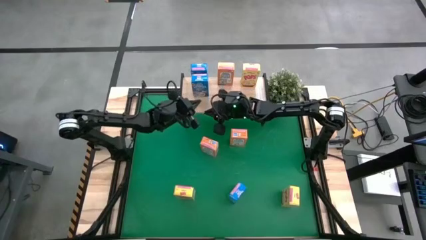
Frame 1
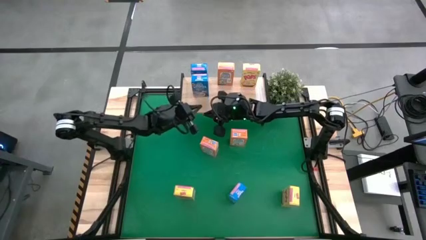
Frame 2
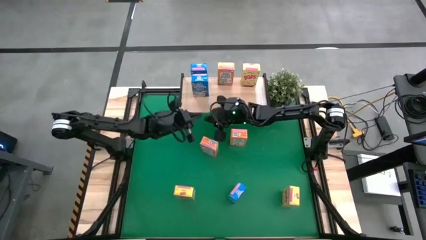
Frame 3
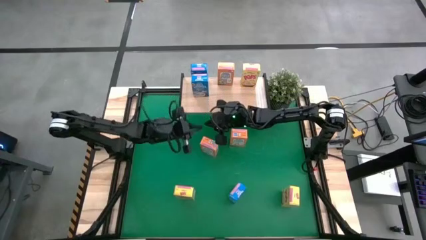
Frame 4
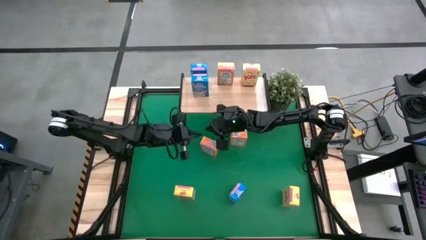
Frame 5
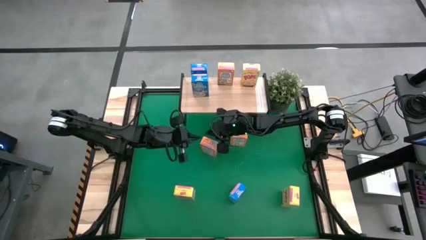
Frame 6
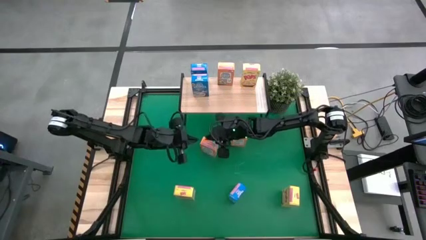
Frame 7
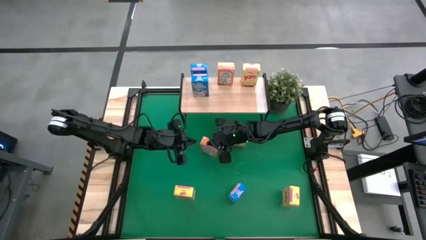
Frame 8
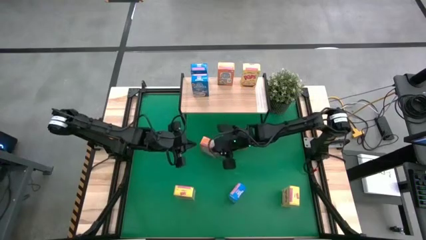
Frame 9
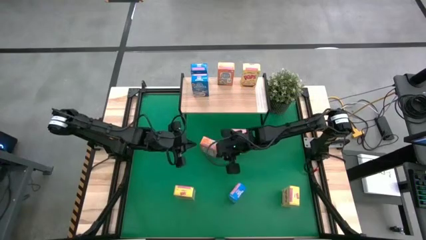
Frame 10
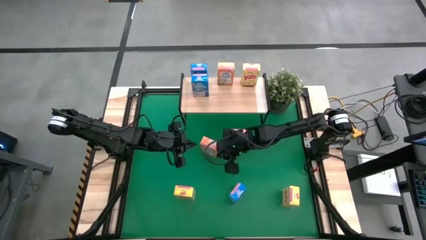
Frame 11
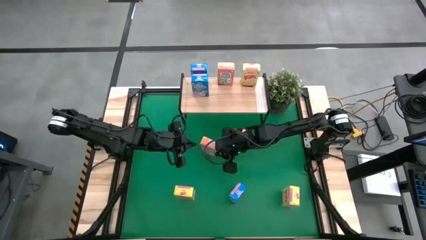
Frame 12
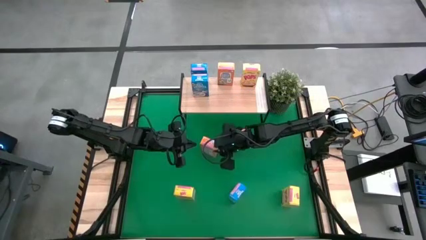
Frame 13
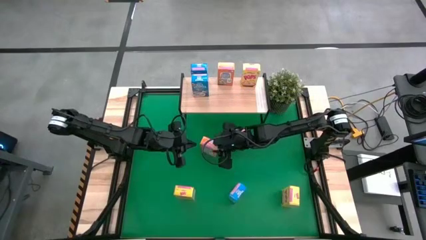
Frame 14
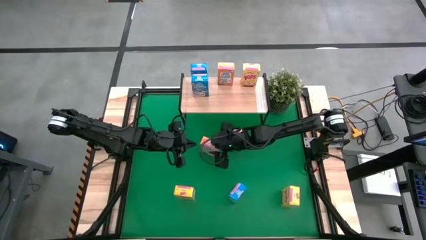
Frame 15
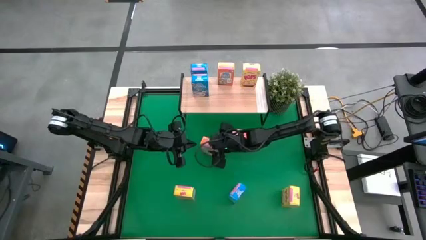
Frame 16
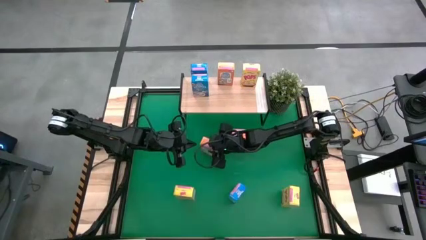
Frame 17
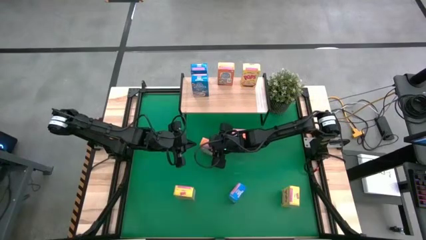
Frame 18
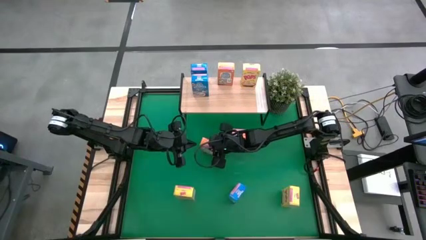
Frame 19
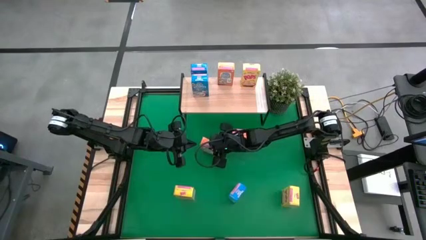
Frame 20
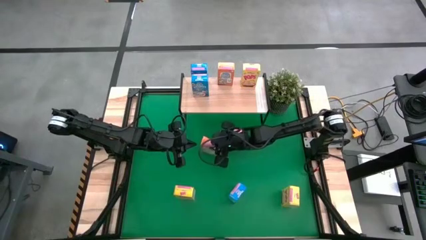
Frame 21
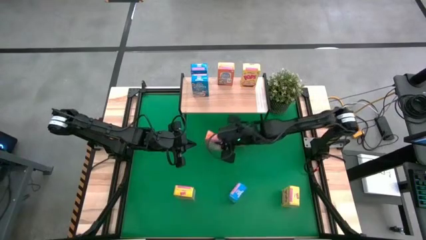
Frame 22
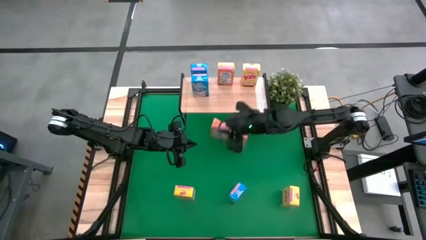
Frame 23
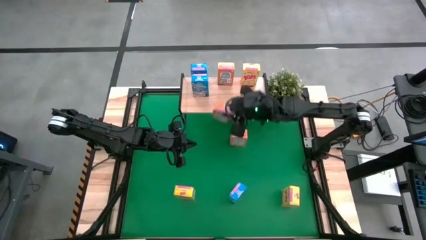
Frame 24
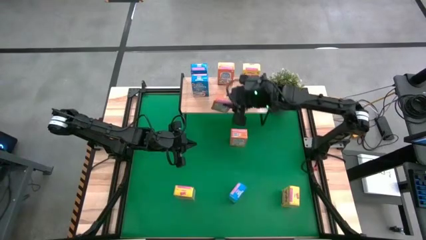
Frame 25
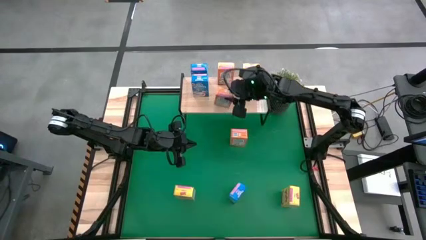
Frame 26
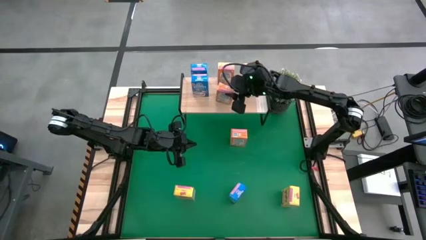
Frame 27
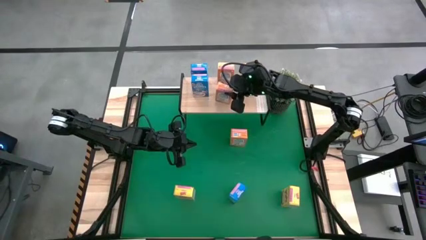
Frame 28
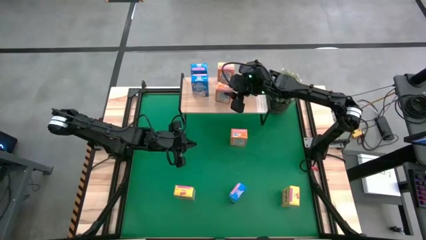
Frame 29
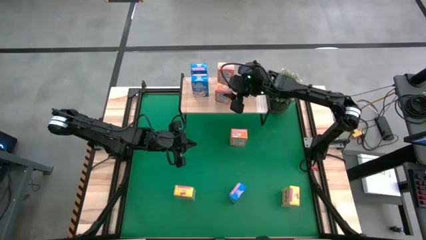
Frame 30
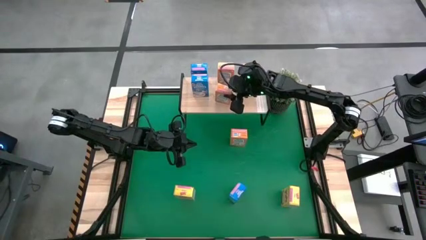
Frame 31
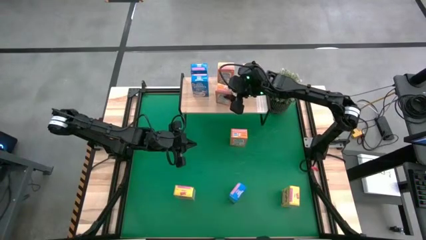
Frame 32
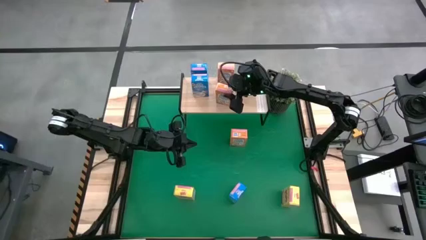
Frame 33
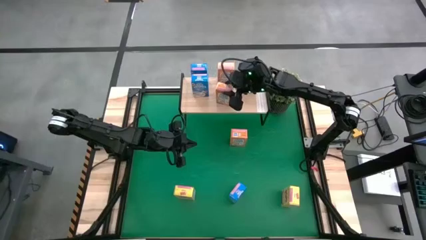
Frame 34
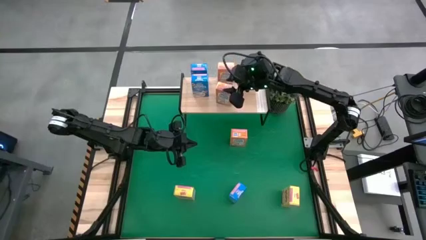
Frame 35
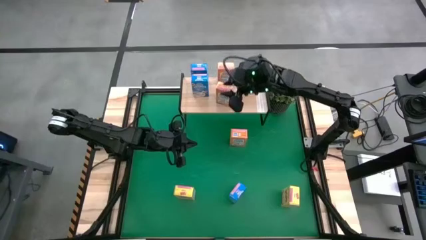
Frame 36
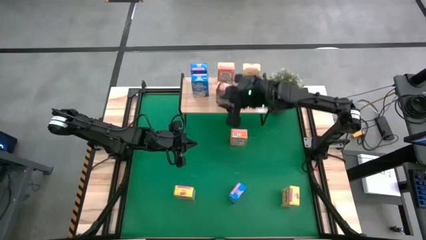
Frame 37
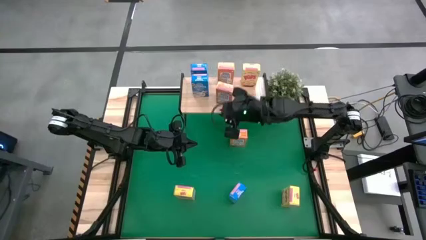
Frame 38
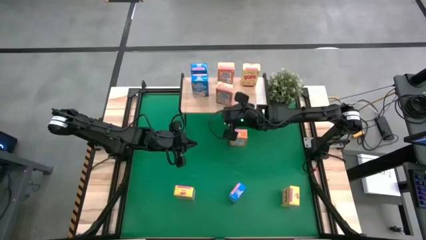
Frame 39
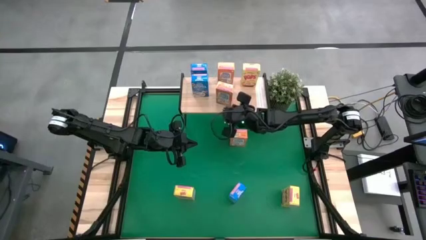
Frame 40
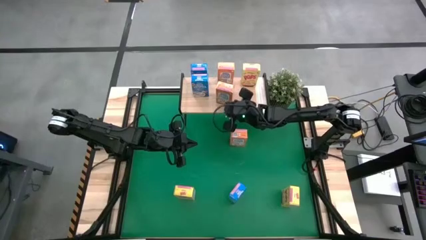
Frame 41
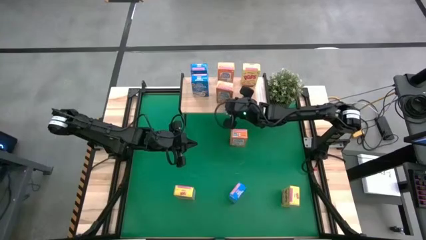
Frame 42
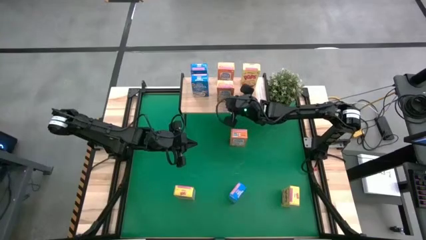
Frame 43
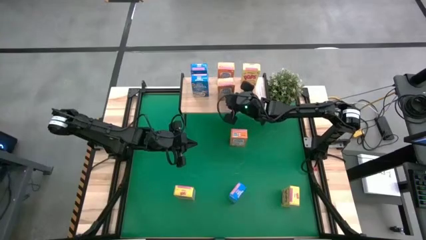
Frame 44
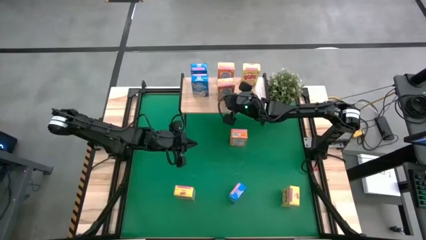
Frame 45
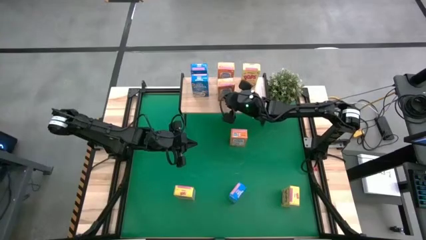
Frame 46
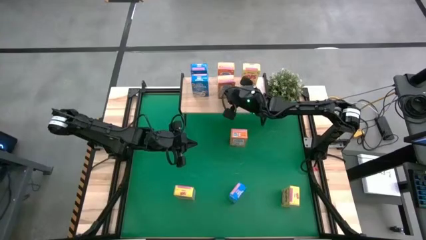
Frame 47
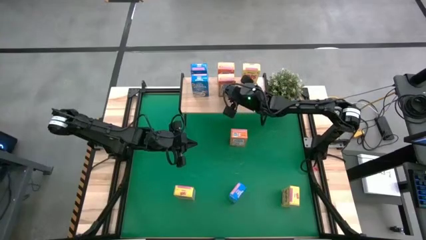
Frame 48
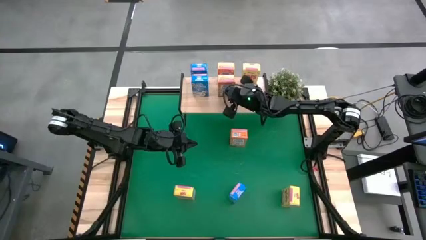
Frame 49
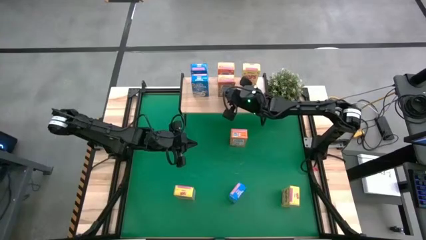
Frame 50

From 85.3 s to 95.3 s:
Task: Stack cereal on shelf
Put the left orange cereal box on the shelf

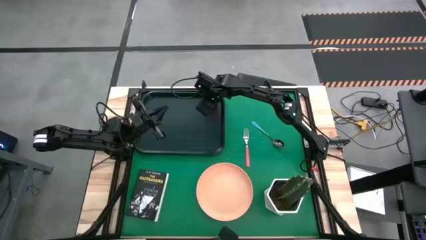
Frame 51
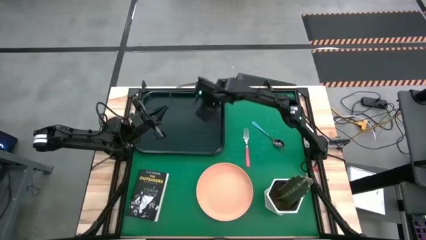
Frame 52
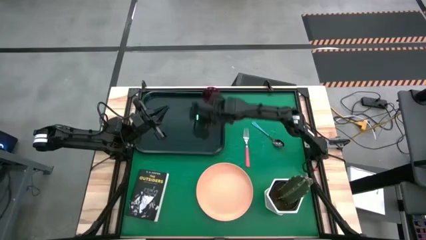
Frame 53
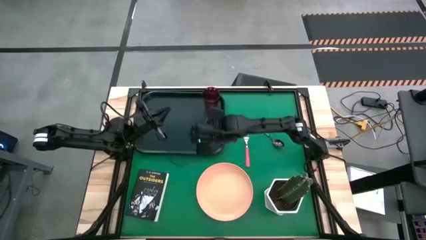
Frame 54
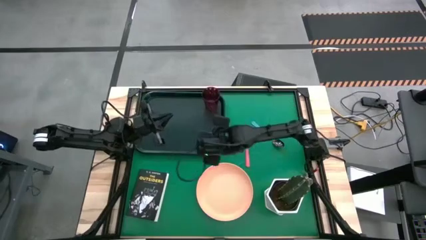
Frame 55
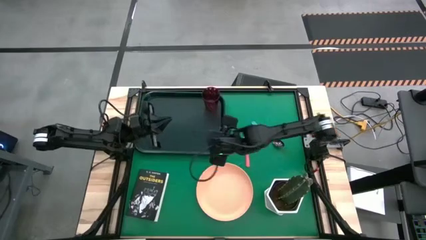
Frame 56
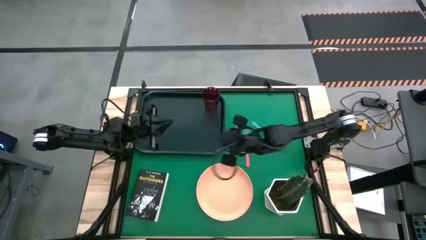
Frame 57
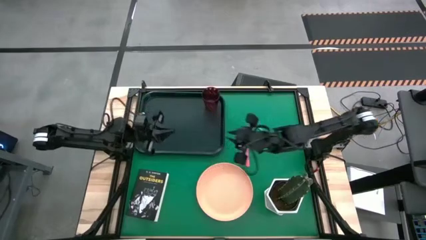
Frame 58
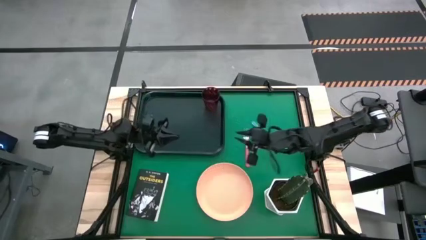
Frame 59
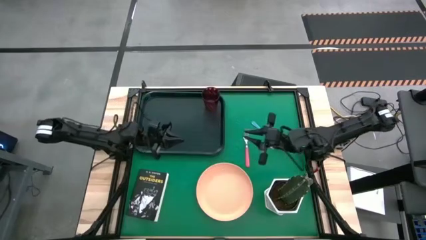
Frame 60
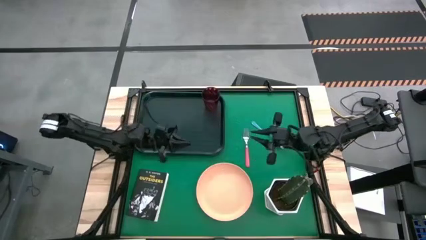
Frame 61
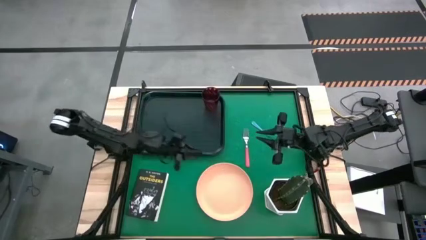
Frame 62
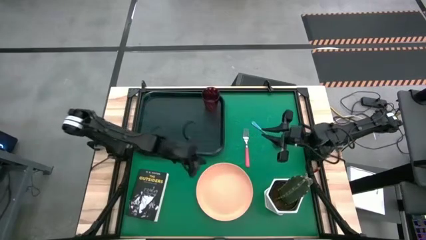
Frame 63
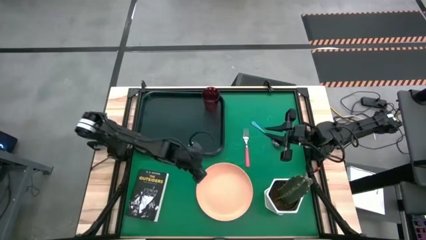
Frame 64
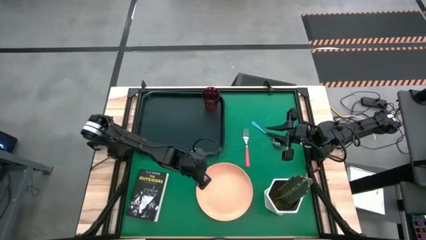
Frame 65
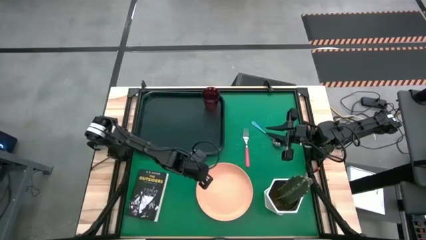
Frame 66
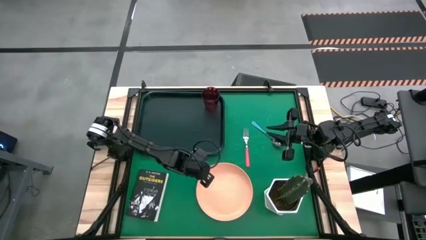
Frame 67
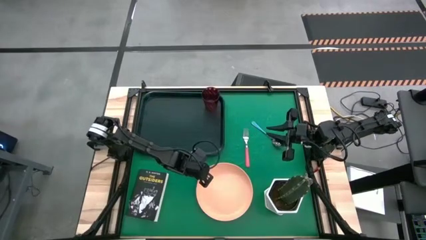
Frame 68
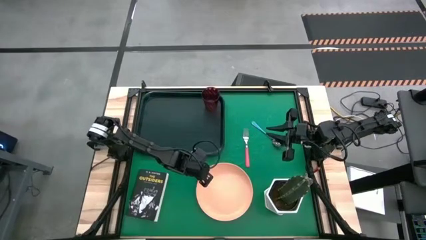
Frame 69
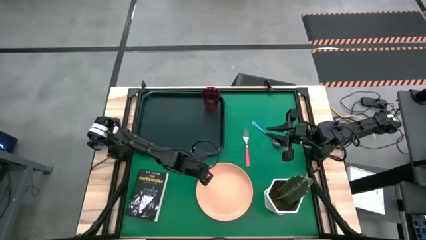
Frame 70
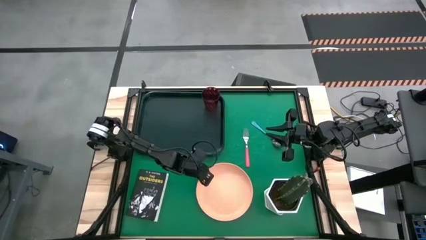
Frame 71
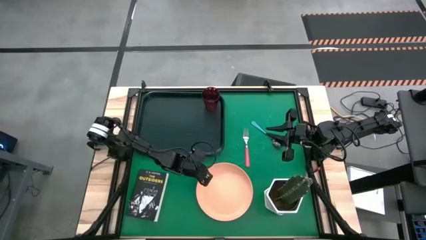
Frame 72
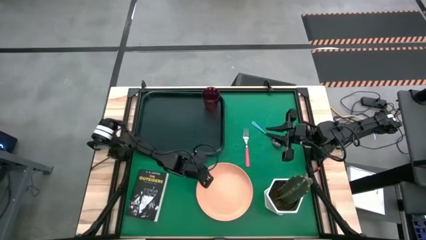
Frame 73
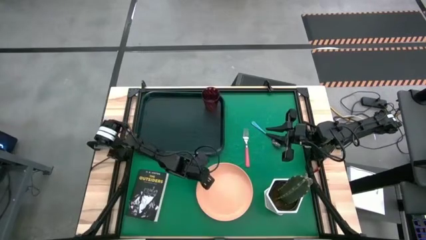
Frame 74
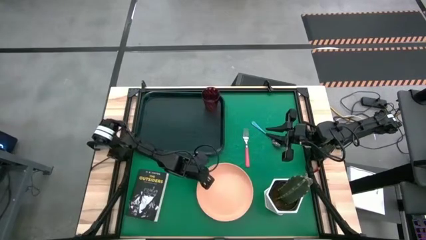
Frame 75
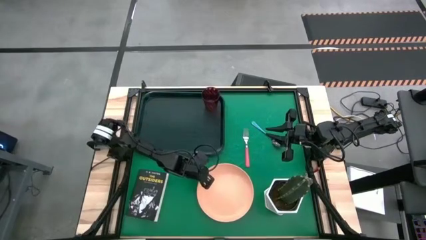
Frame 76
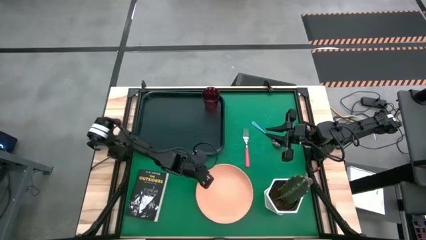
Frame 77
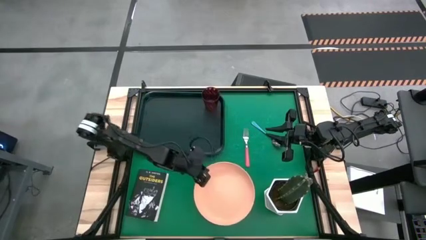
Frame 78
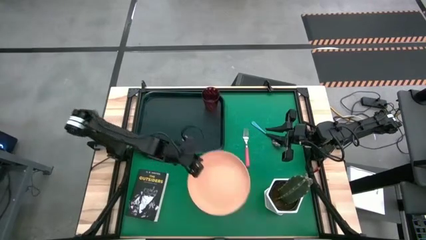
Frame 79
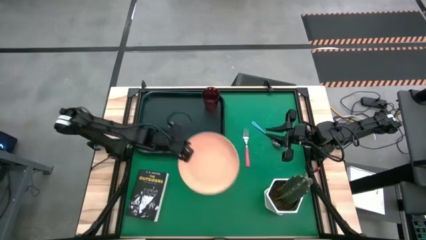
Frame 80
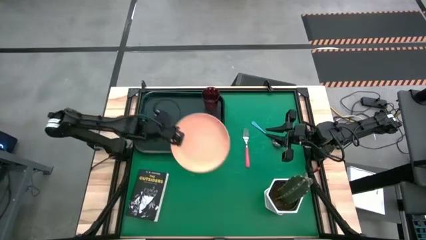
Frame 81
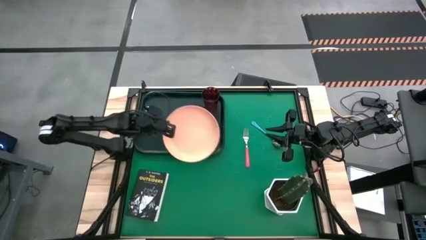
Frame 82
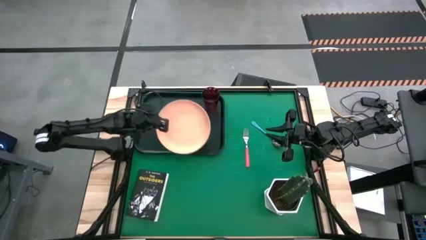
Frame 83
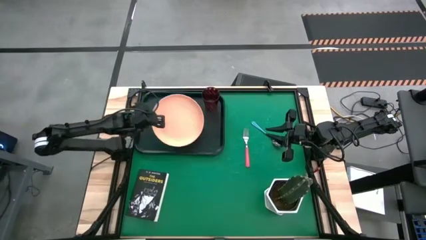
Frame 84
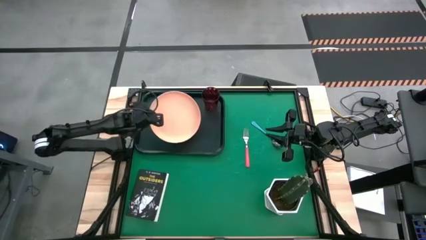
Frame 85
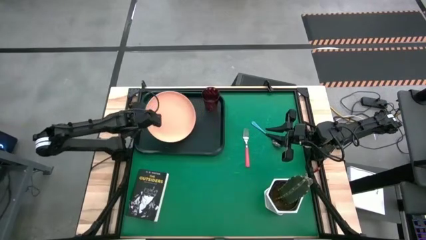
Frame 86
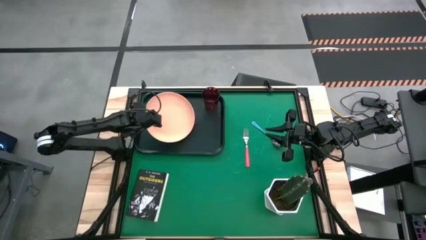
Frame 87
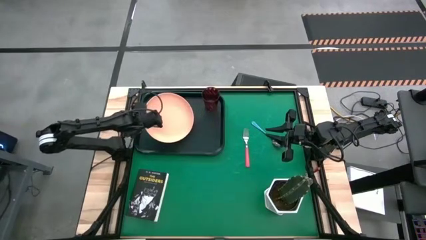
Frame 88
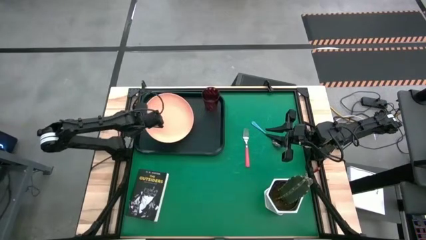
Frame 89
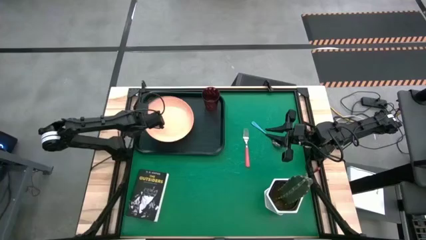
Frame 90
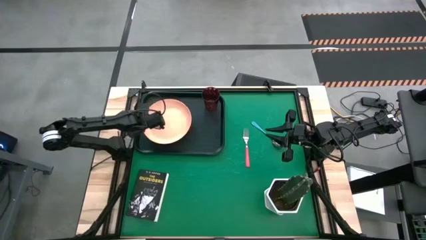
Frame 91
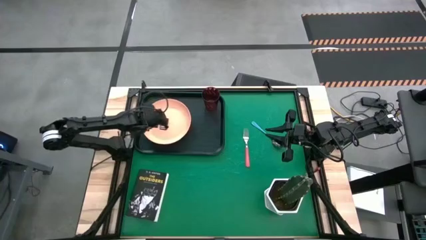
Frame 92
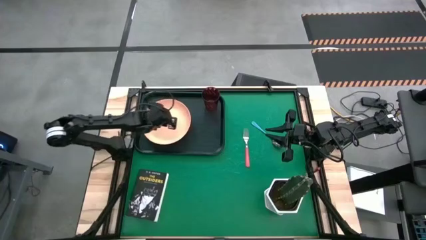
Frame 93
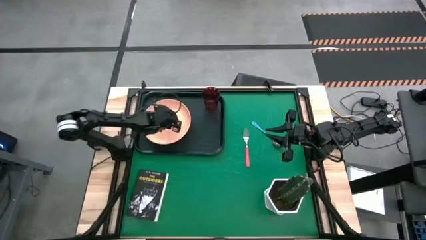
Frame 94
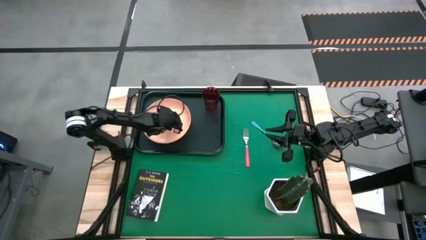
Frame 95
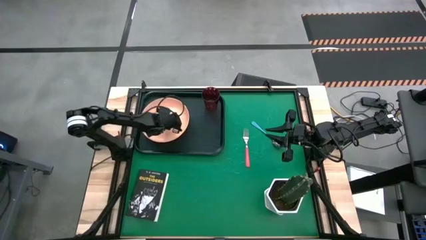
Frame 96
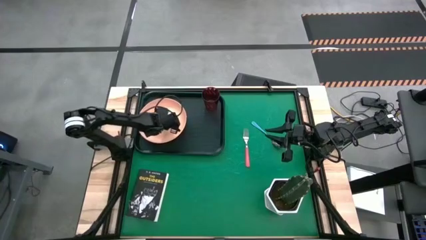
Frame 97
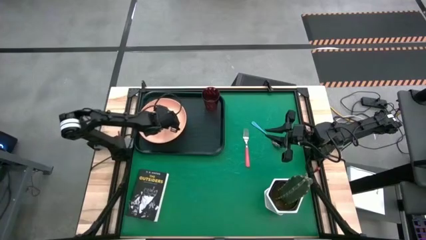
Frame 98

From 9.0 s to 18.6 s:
Task: Pick and place plate/cup/fork/spoon on tray
Put the orange plate on the left of the black serving tray
